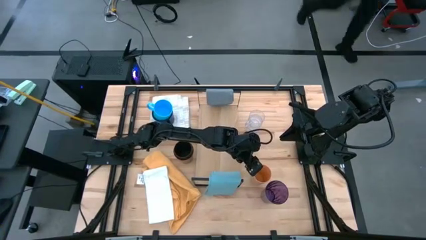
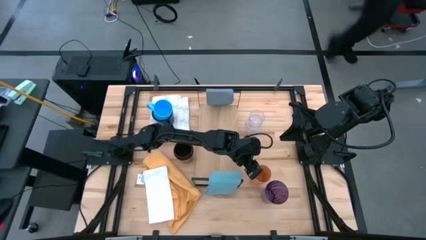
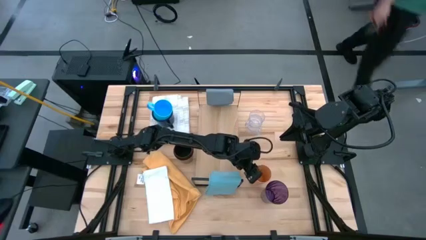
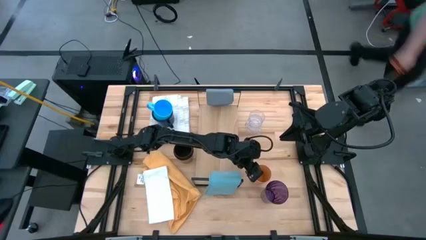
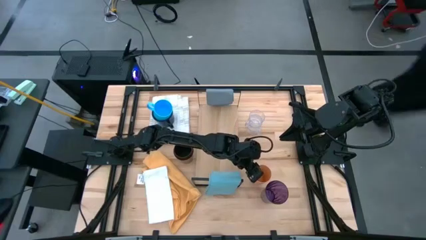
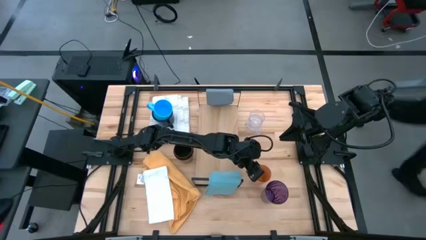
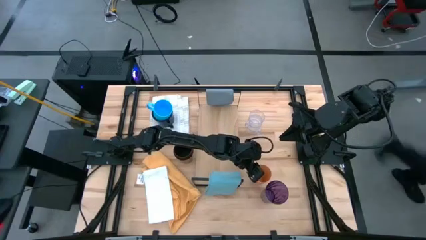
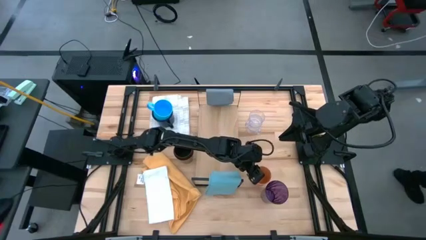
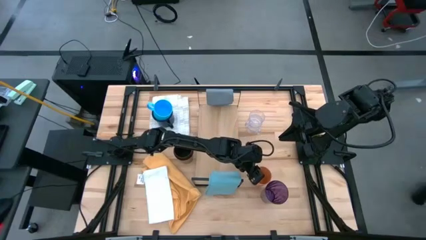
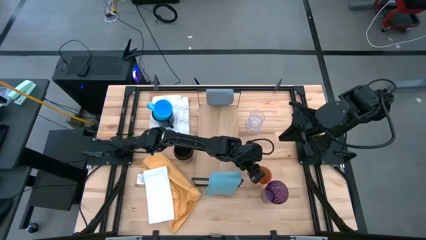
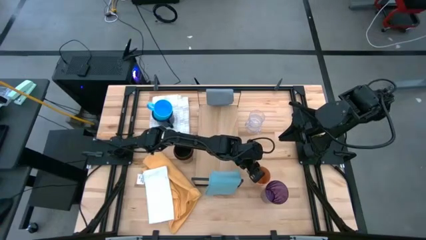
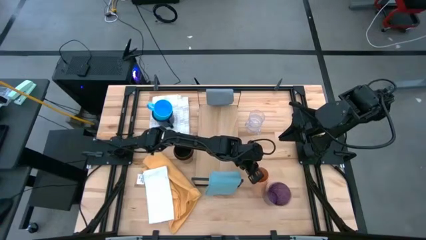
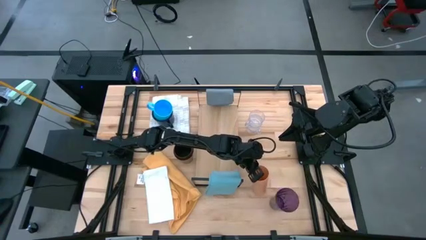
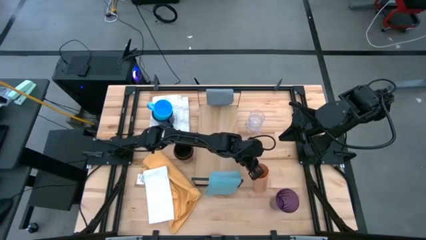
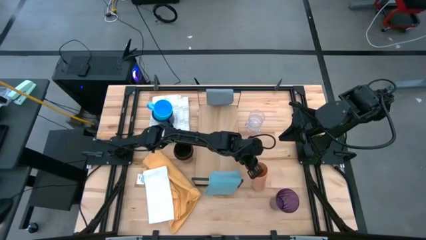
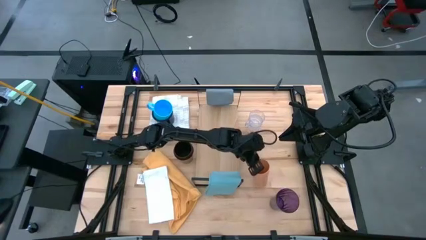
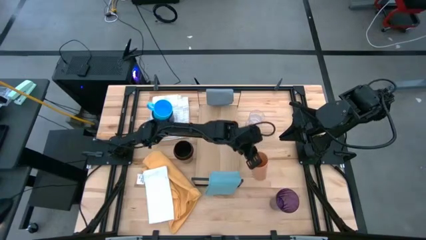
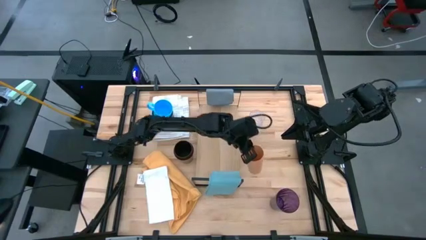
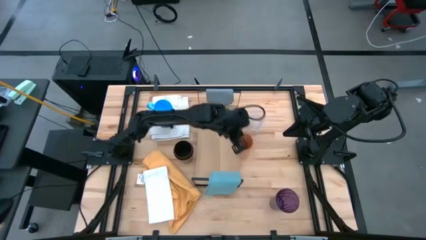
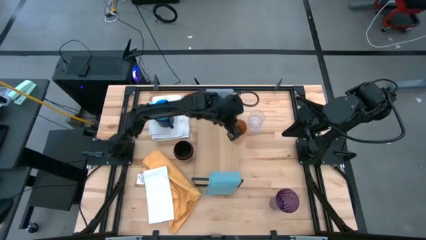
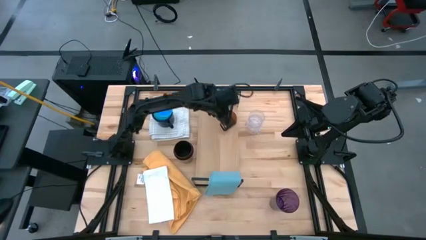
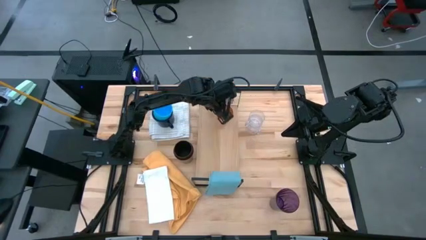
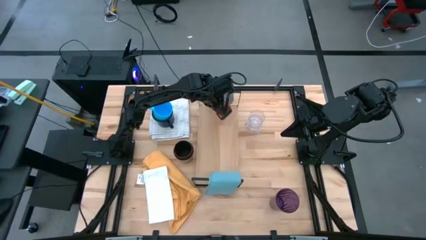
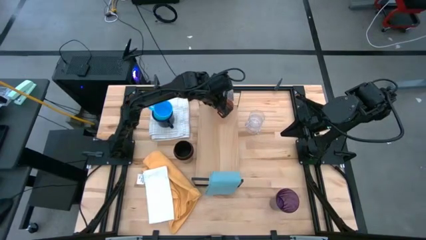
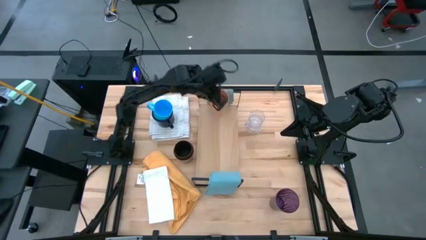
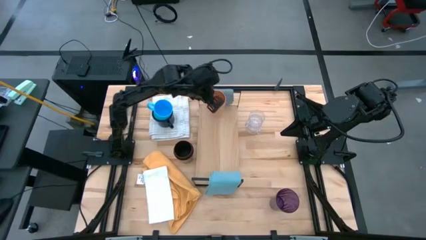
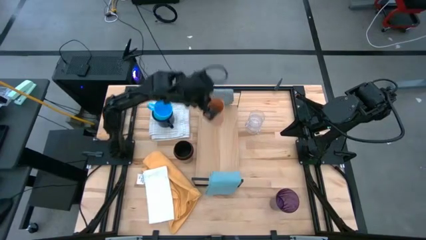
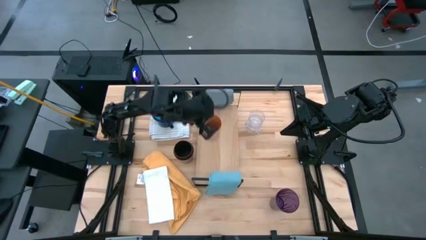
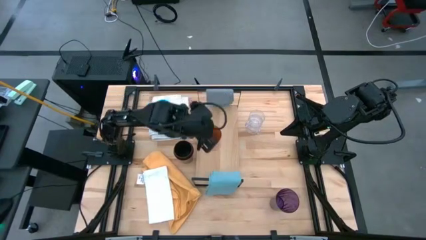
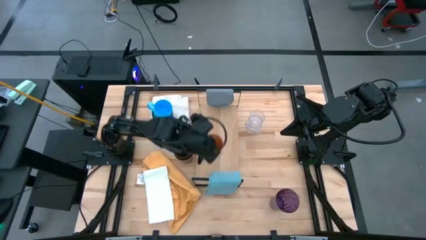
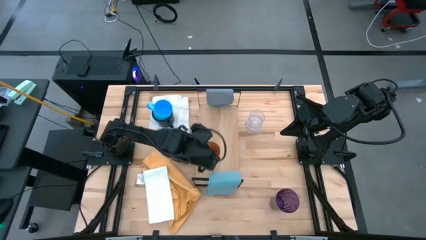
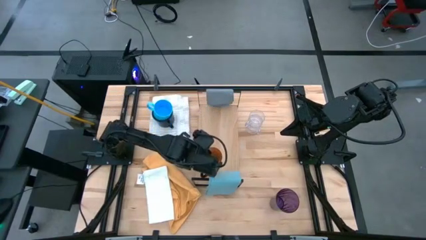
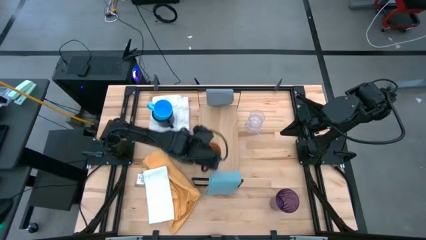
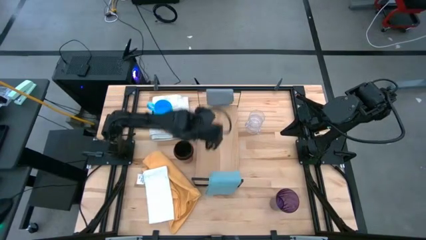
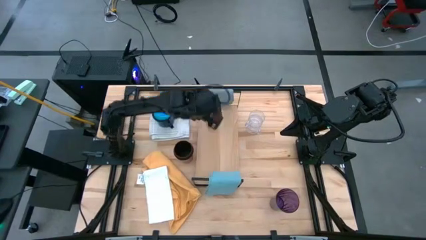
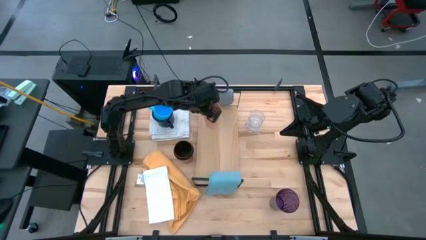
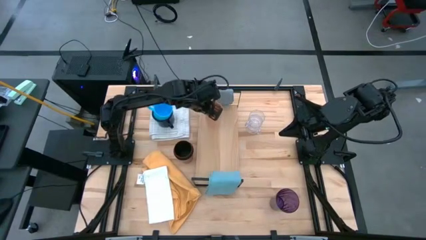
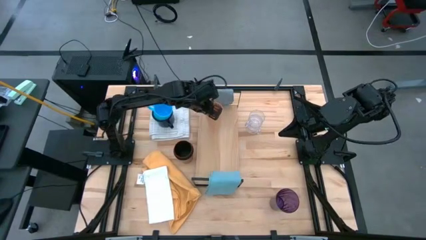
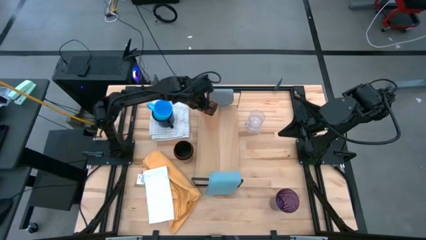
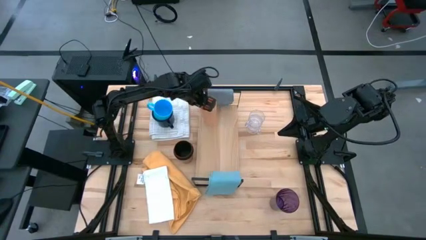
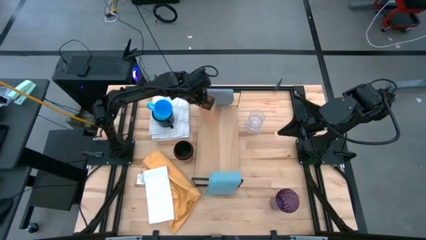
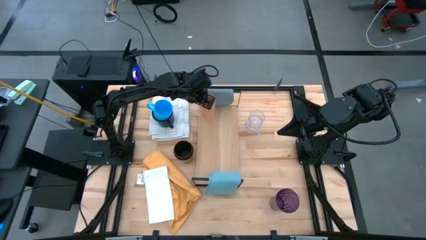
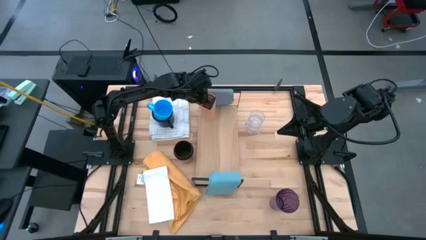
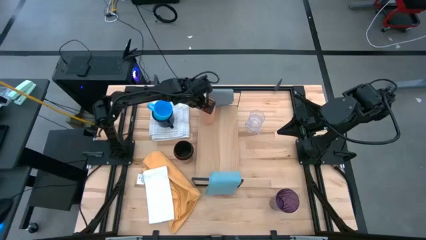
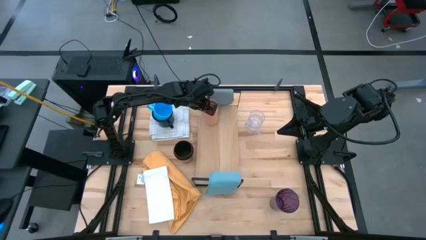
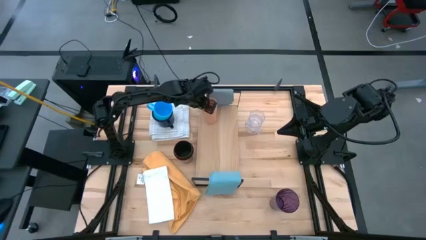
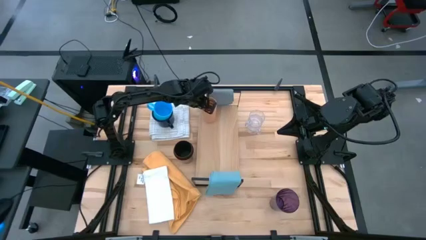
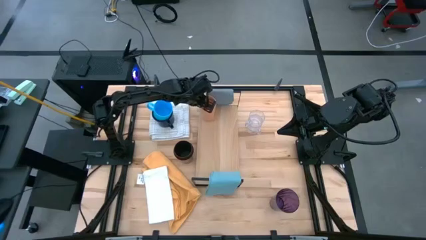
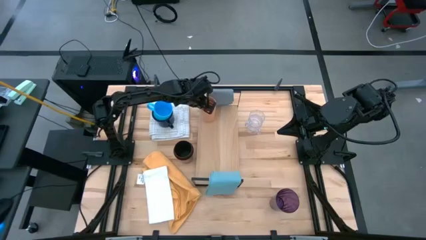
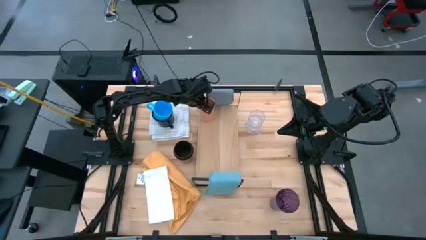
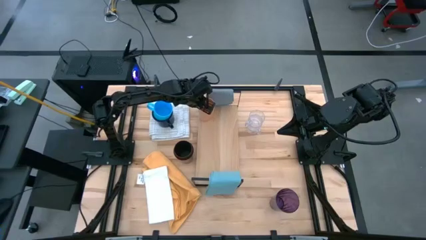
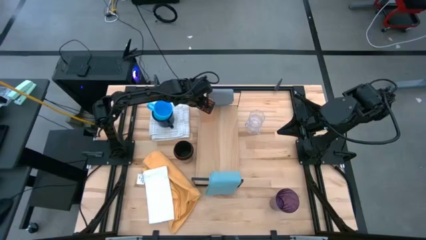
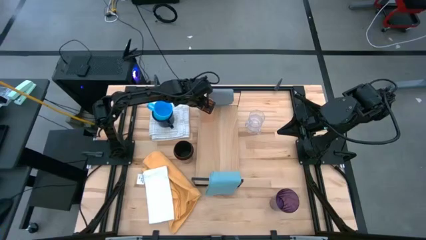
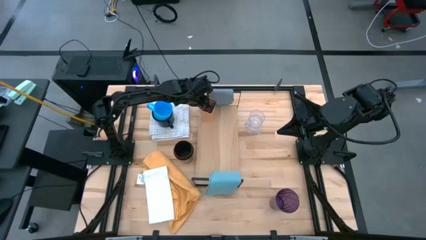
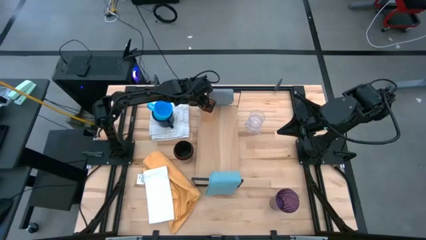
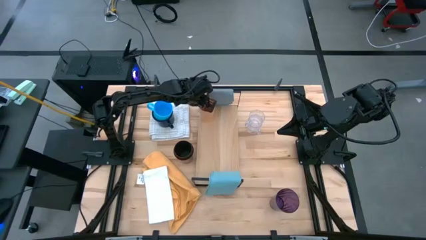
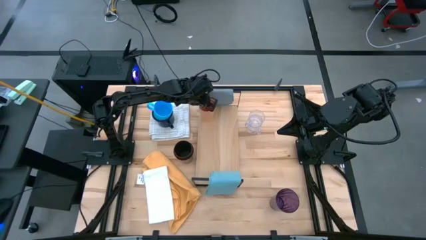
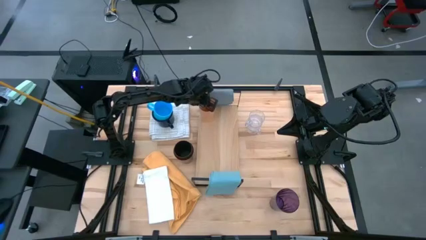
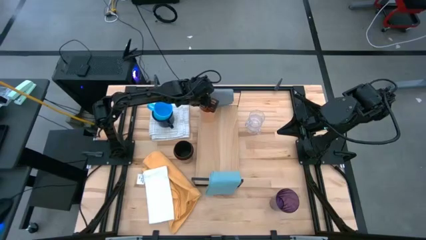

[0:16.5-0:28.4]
Task: Stack small to large cups/mugs on shelf
Put the orange cup on the shelf
